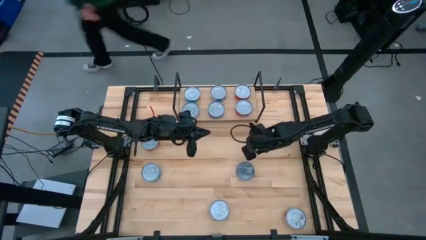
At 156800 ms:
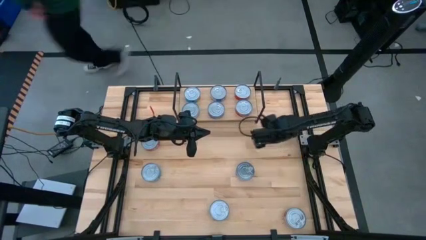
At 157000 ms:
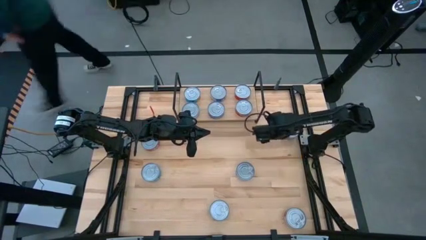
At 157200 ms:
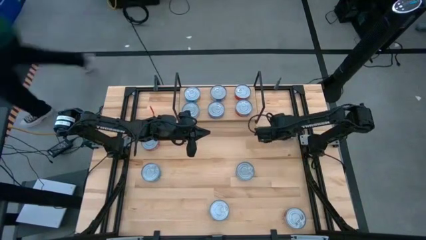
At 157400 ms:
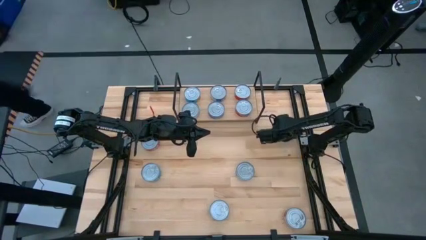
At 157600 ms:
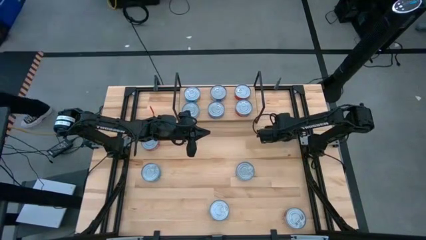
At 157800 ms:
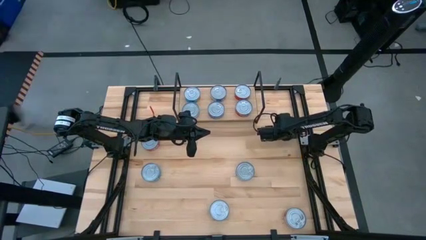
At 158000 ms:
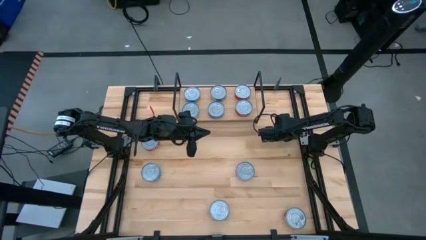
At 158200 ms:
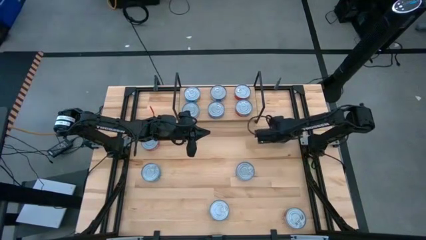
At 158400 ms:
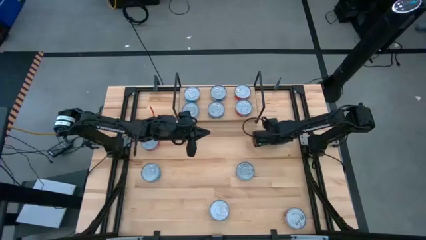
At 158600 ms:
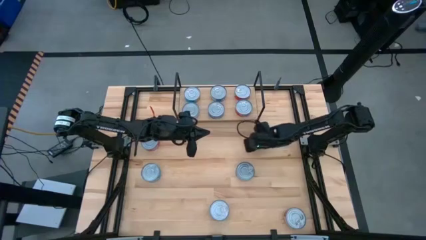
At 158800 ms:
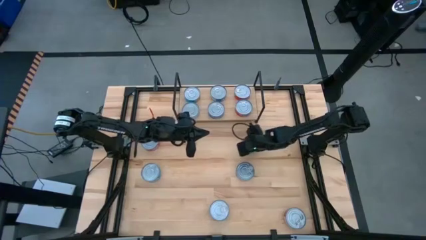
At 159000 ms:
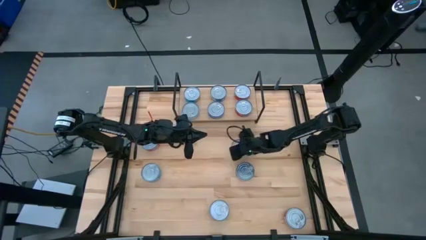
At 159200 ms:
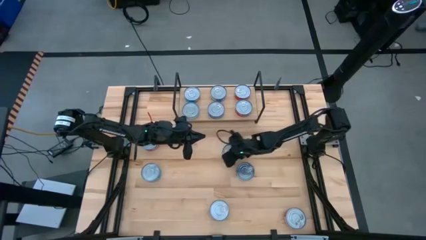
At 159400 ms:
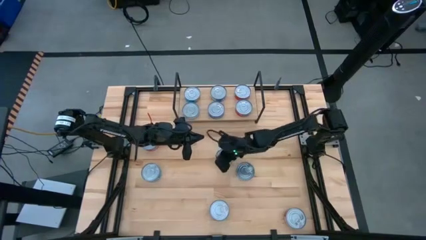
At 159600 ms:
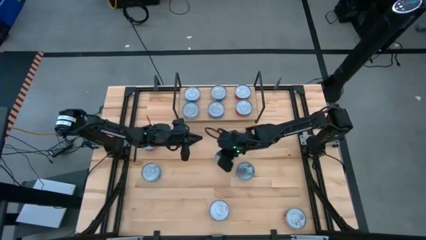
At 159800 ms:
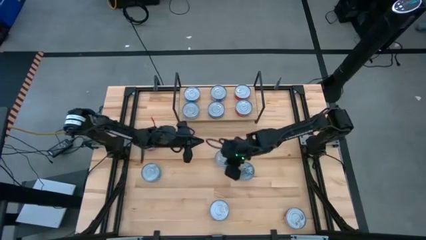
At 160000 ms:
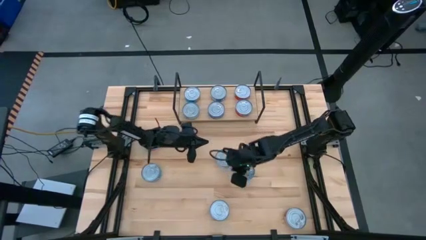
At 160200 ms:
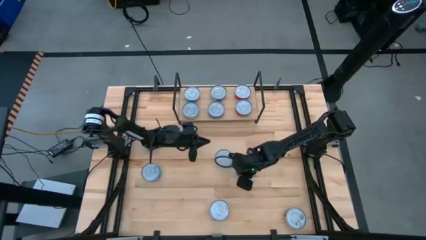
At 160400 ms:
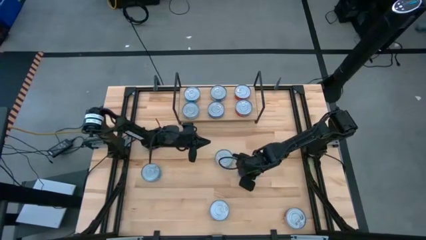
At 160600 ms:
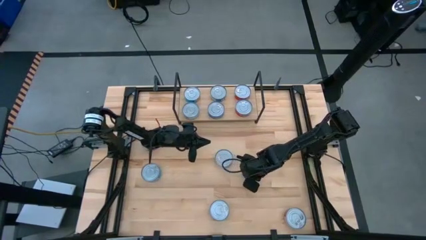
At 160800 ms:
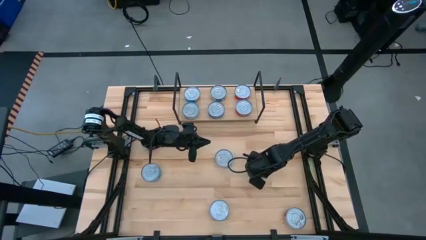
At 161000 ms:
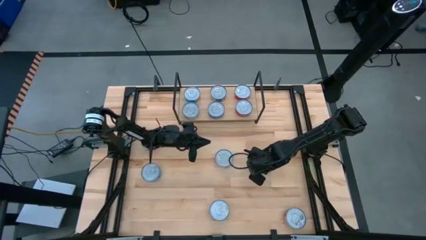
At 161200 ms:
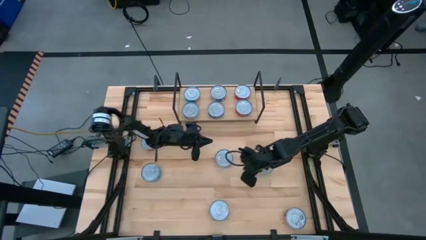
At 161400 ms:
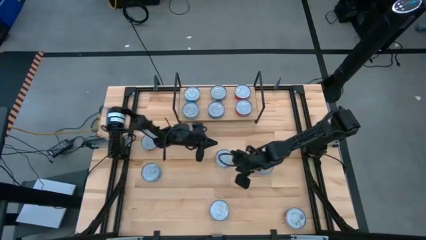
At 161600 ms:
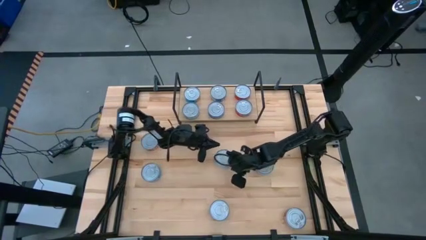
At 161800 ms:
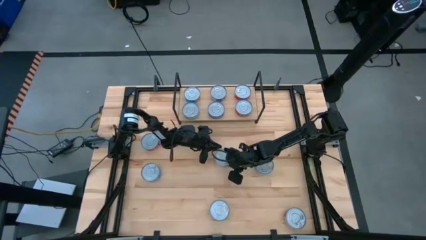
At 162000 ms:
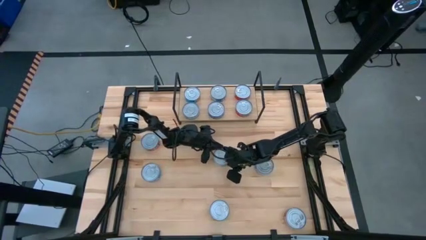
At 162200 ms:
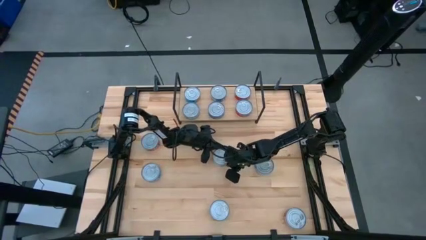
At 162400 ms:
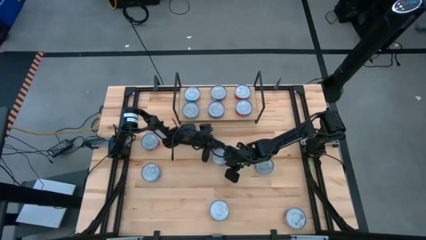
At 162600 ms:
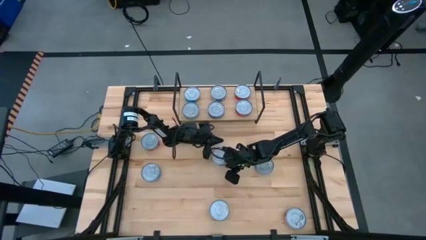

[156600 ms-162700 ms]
Task: Stack canned seafood by type on shelf
Move the middle right blue tuna can to the center of the table

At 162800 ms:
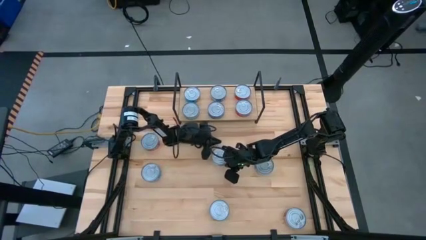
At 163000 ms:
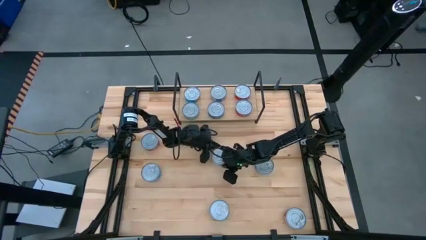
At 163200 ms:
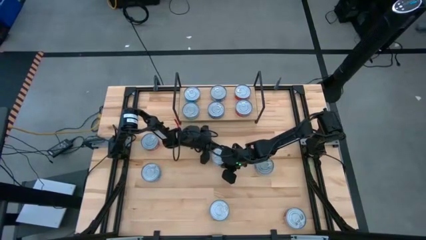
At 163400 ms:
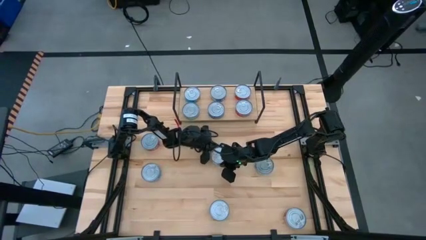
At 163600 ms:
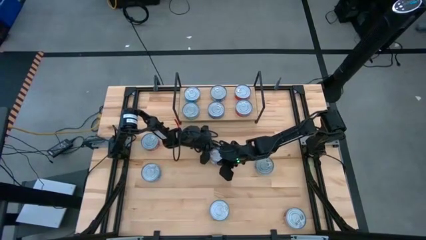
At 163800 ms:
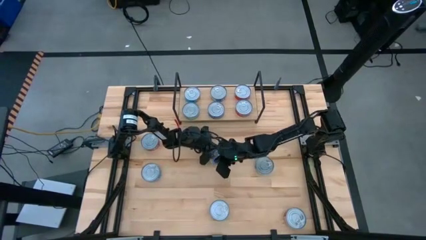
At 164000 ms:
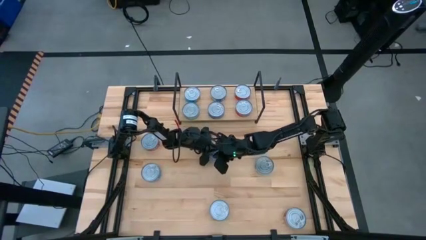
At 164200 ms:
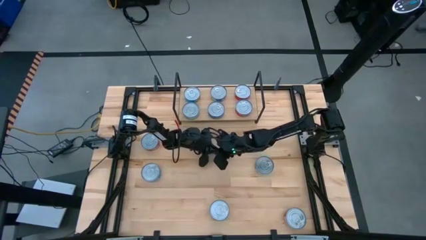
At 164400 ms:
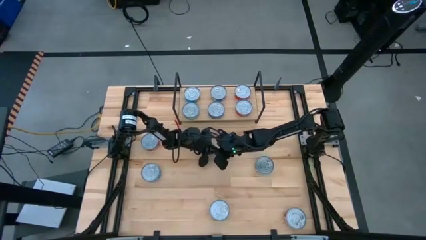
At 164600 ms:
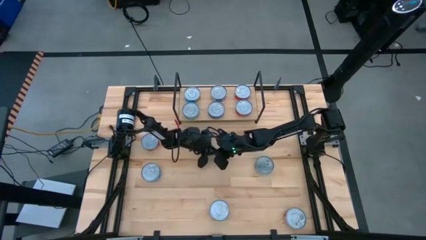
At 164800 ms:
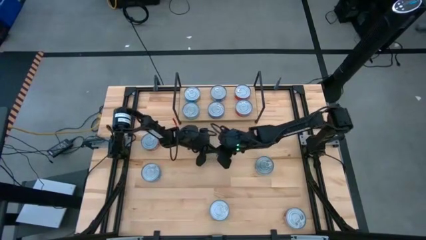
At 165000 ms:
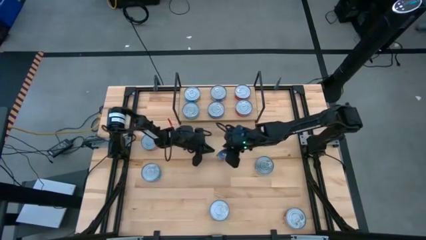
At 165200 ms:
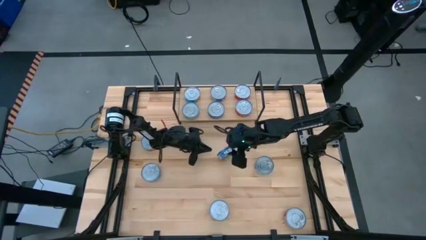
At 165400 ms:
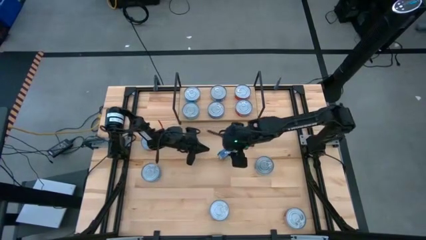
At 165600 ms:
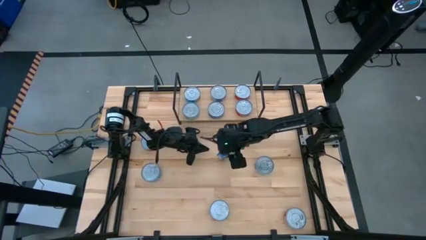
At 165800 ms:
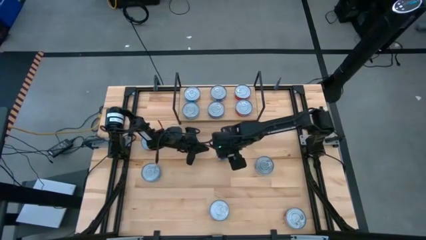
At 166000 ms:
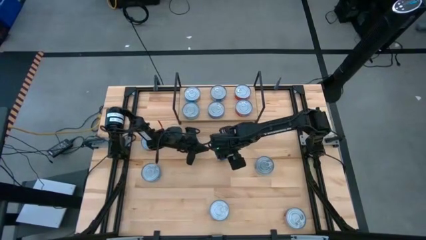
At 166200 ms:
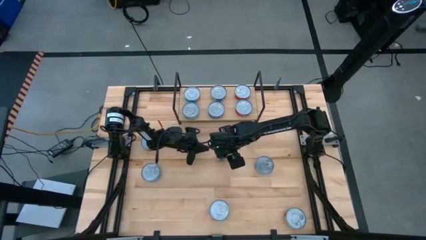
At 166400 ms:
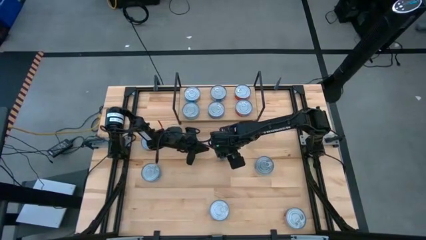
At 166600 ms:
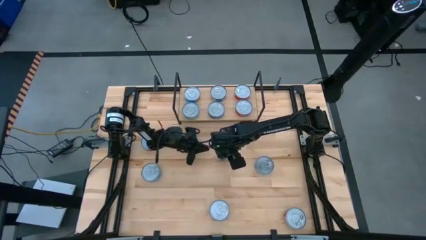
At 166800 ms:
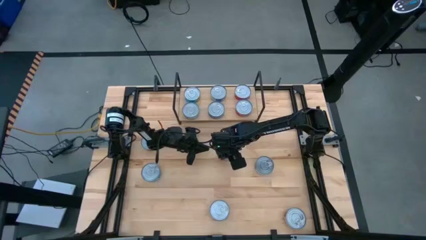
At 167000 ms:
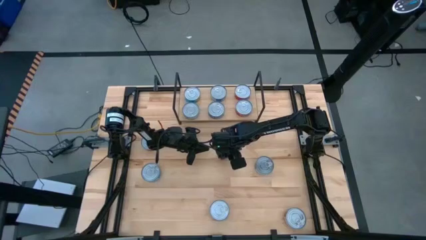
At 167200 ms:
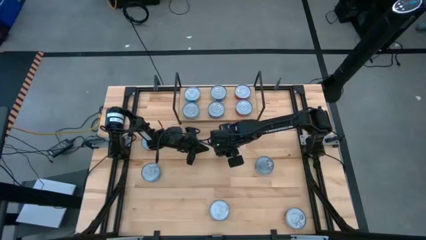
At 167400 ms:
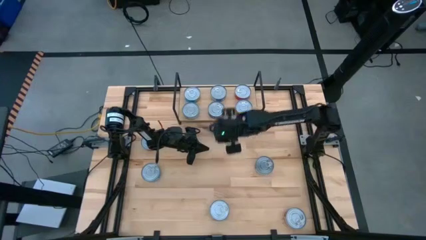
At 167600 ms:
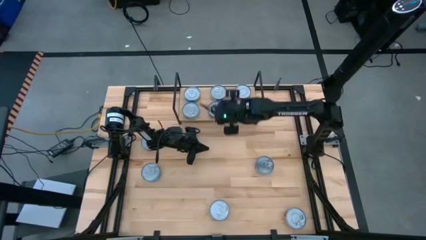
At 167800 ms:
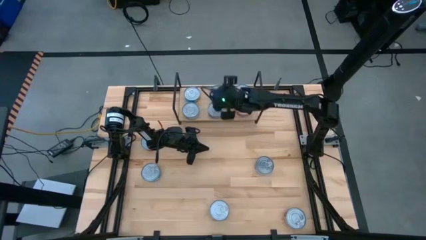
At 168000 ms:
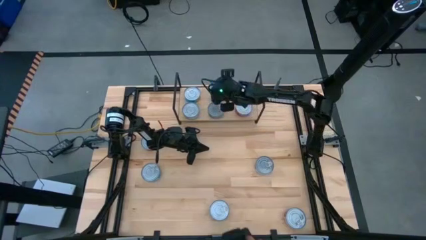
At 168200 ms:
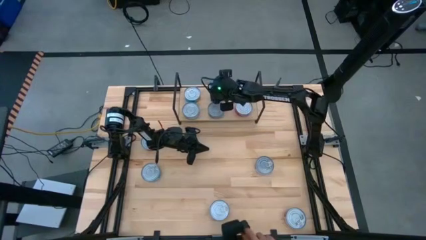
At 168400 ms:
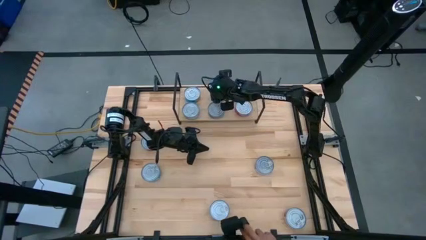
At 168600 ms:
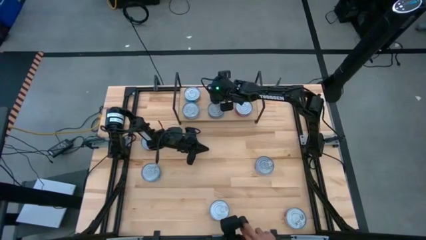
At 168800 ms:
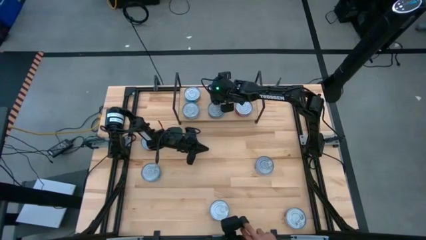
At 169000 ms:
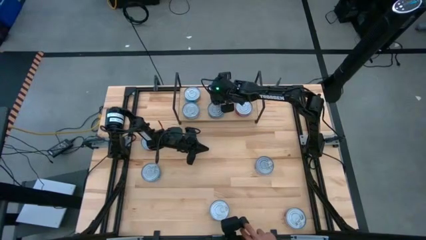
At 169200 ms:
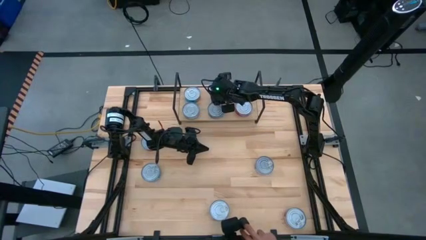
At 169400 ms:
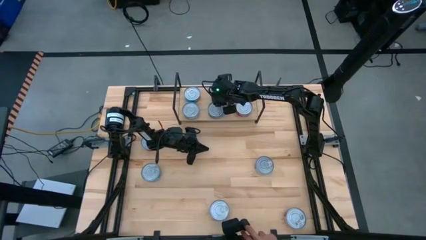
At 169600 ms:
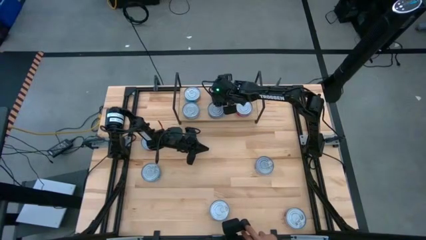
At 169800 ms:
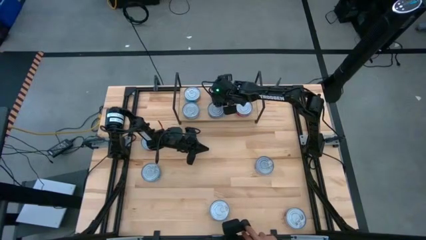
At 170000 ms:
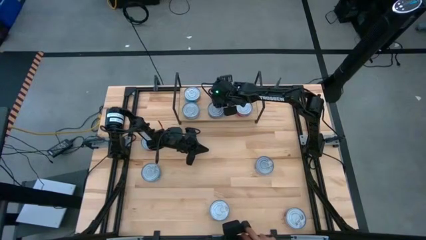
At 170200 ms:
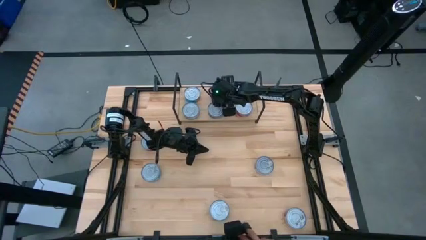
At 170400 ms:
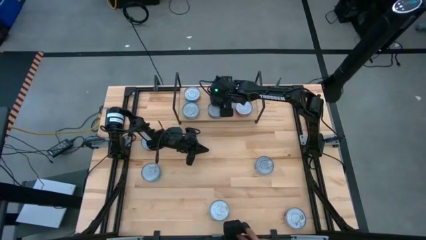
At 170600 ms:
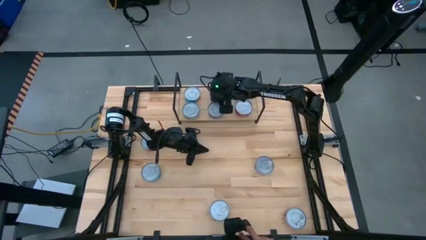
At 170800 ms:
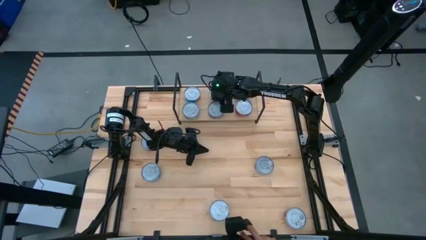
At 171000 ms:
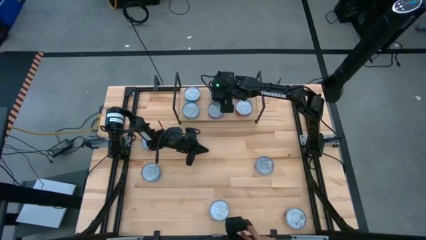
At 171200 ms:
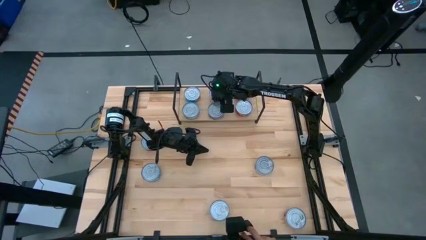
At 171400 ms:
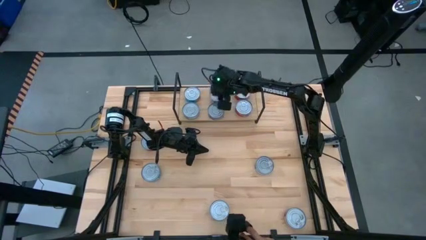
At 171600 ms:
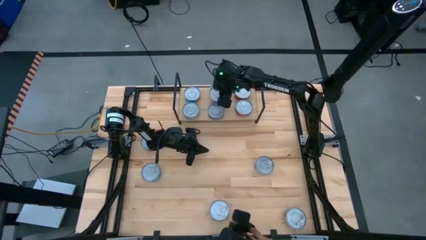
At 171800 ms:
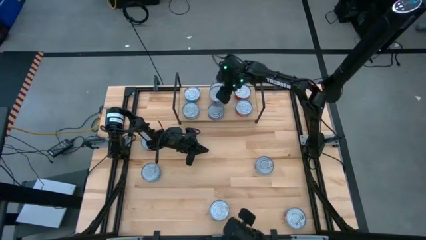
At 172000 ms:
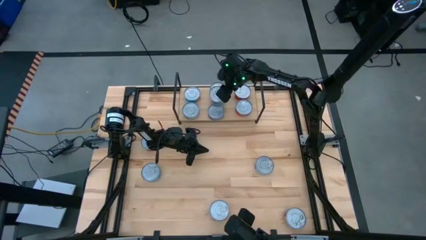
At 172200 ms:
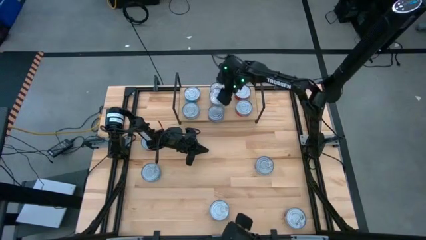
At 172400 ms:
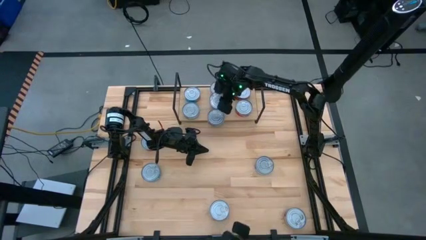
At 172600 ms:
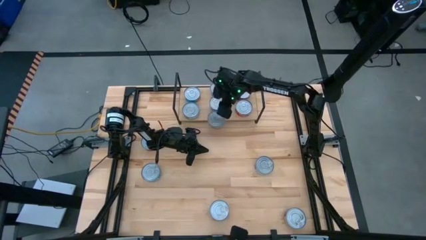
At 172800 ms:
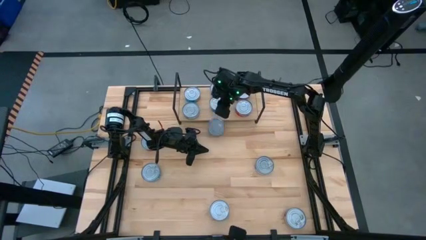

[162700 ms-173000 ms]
Put the center blue tuna can on the shelf aligned with the other tuna can
